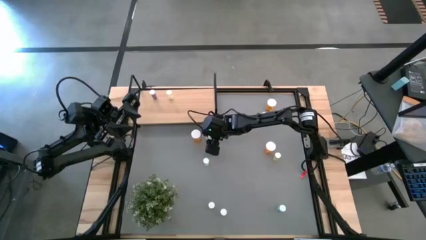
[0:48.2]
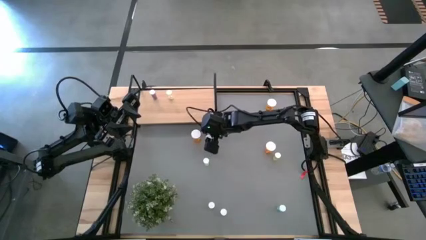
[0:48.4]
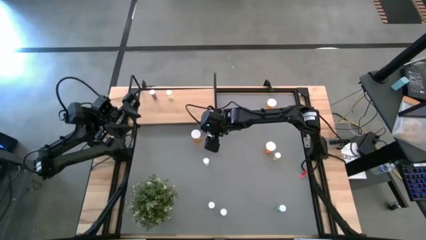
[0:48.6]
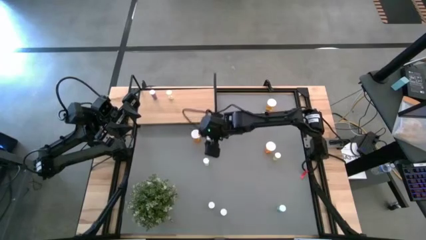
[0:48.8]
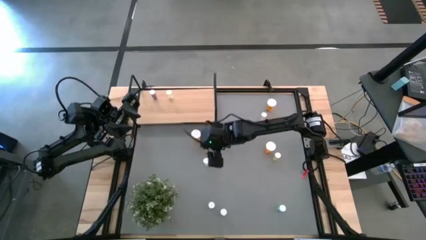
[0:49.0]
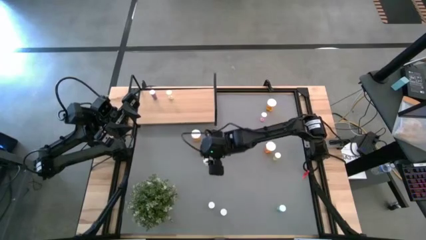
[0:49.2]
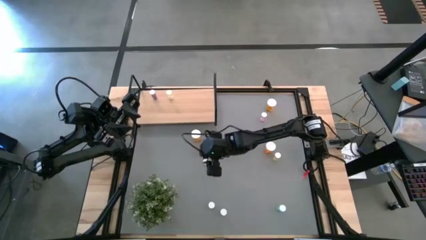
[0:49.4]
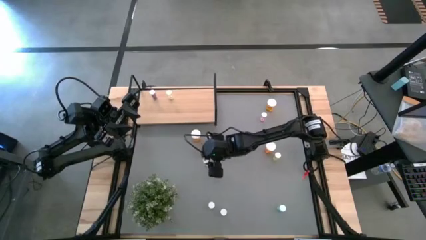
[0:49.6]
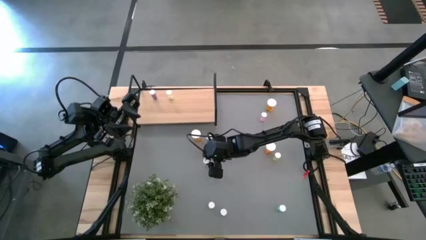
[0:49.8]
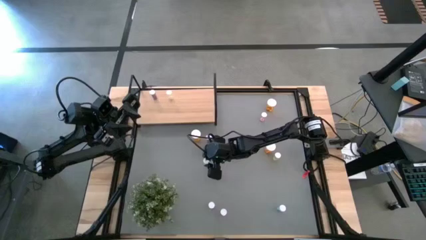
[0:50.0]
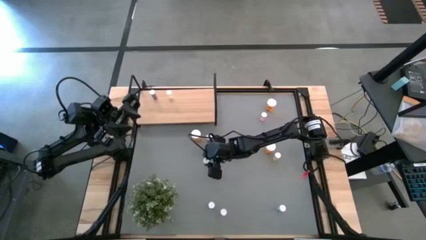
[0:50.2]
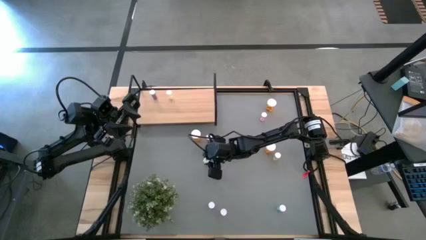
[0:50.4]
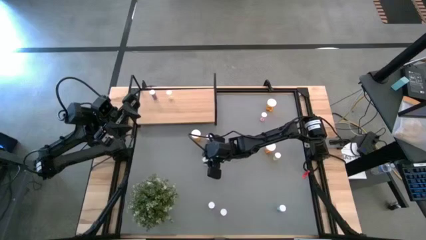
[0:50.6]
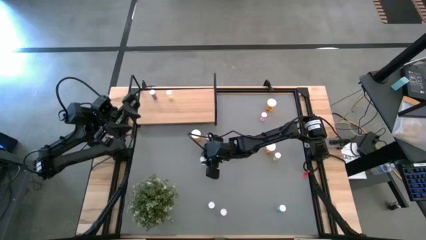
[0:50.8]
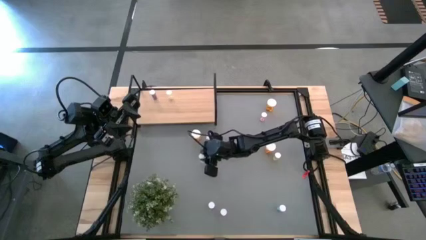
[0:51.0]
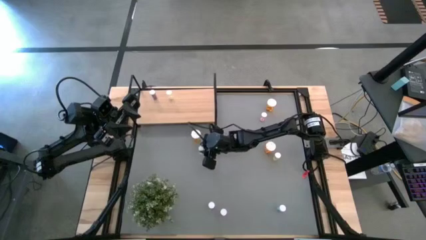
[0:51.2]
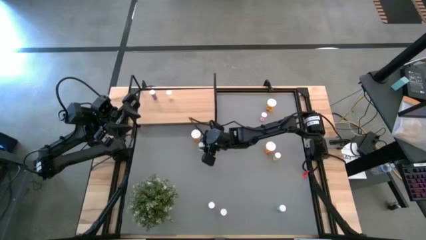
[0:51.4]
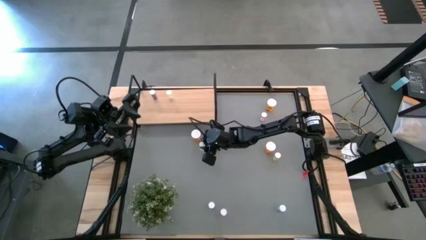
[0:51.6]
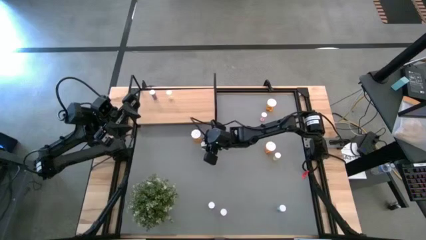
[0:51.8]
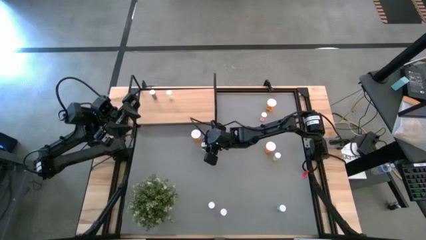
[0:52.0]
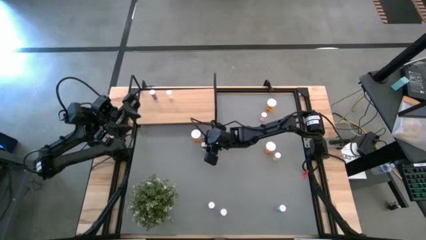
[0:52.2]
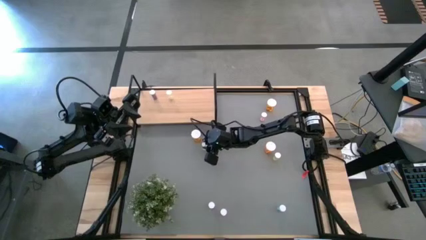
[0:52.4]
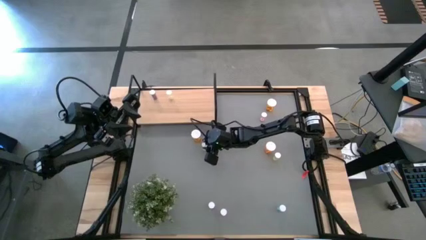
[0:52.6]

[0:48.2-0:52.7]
Task: Pick and place medicine bottles onto shelf by color
Move the middle yellow pill bottle to the middle of the table

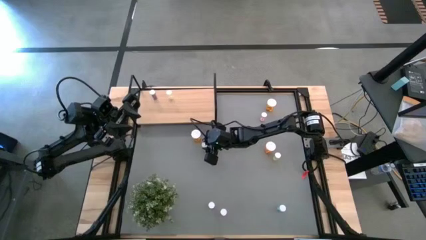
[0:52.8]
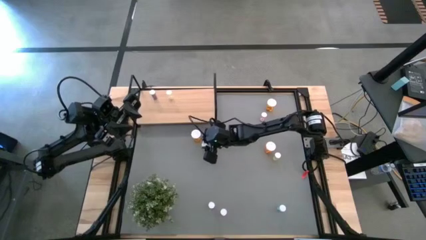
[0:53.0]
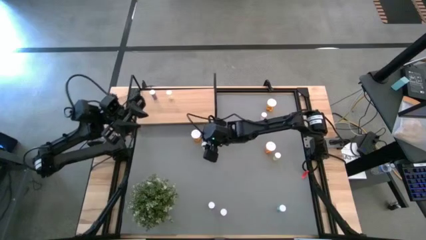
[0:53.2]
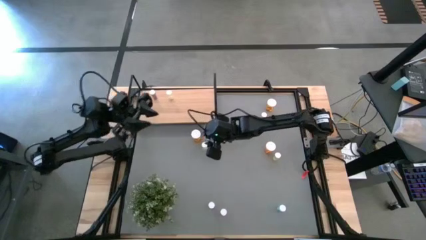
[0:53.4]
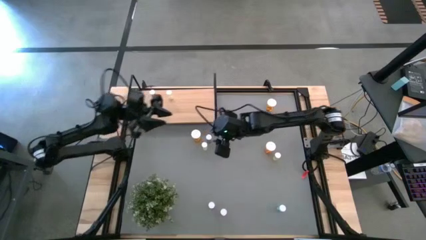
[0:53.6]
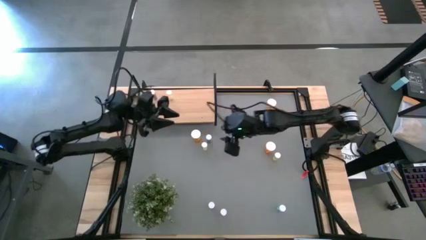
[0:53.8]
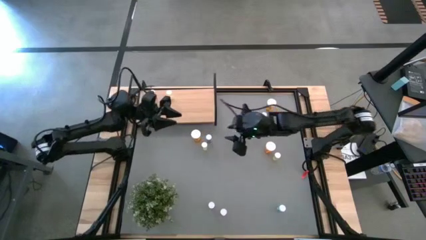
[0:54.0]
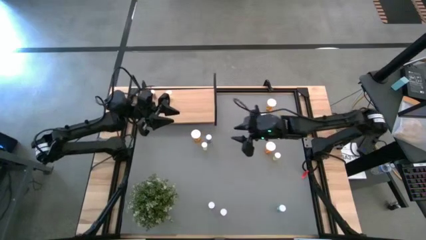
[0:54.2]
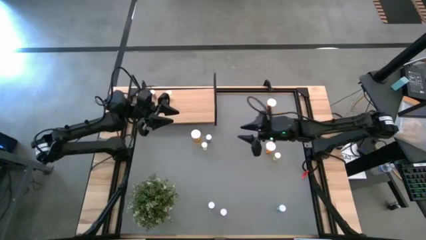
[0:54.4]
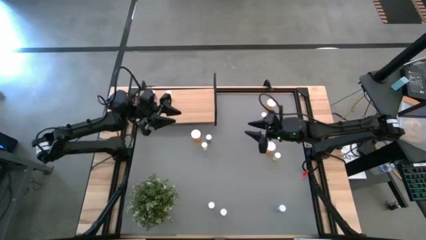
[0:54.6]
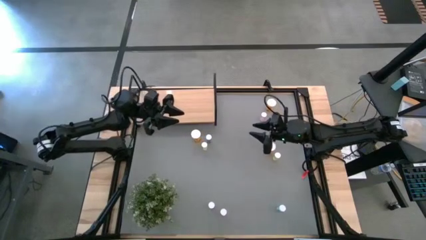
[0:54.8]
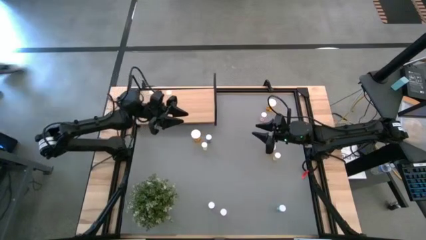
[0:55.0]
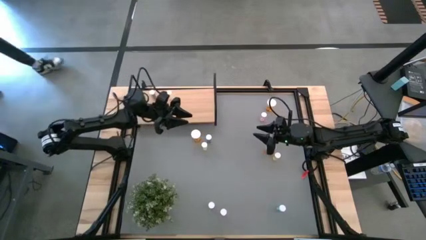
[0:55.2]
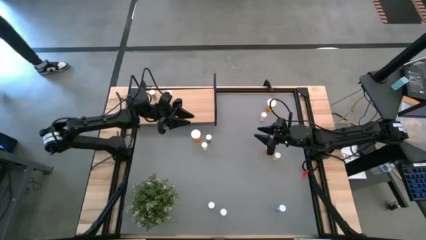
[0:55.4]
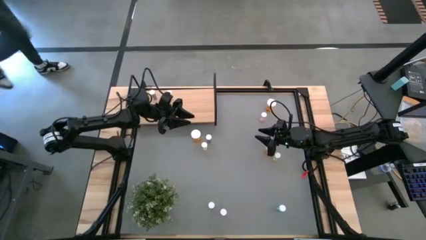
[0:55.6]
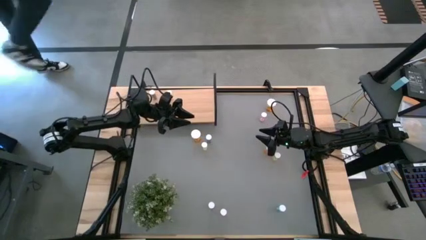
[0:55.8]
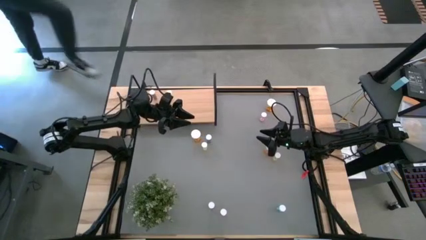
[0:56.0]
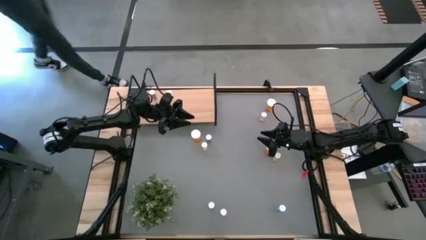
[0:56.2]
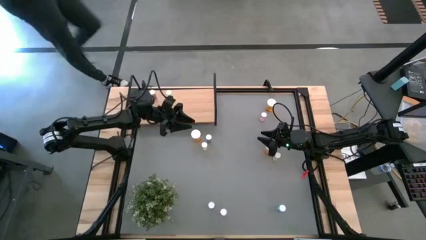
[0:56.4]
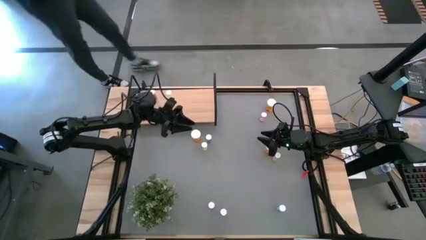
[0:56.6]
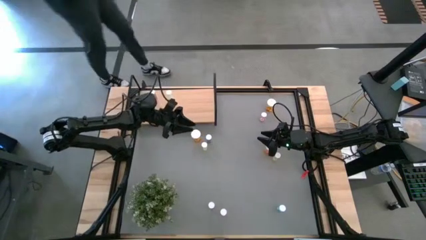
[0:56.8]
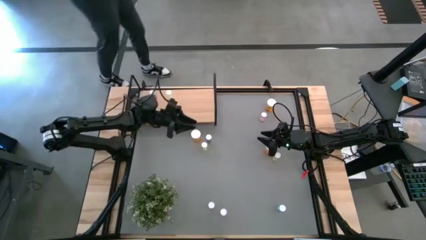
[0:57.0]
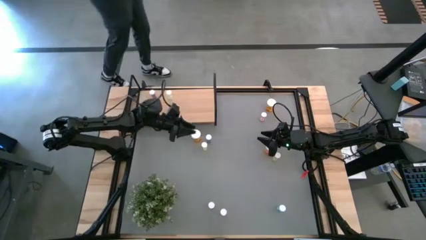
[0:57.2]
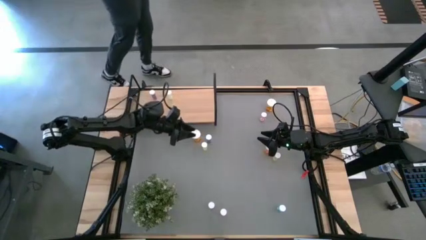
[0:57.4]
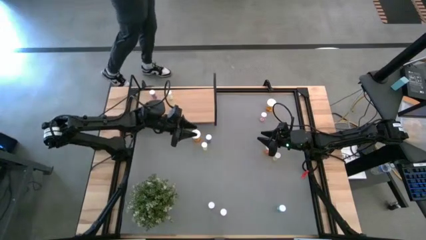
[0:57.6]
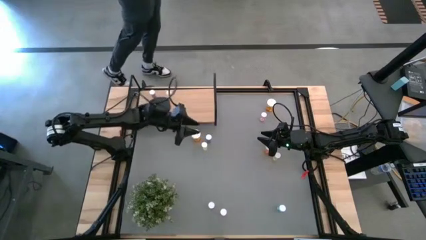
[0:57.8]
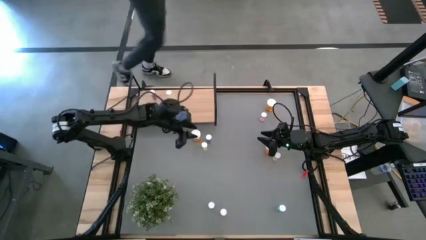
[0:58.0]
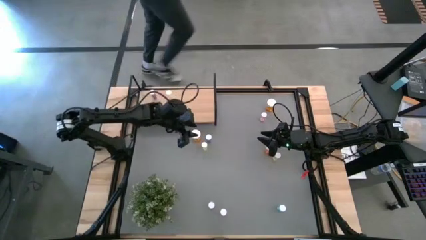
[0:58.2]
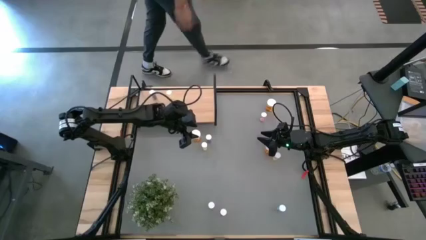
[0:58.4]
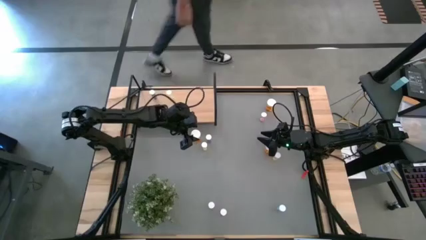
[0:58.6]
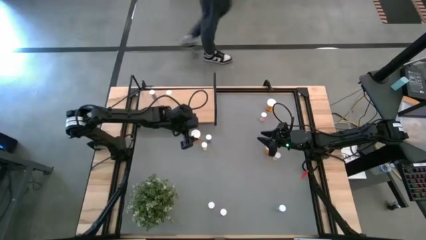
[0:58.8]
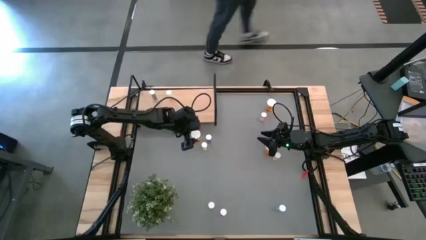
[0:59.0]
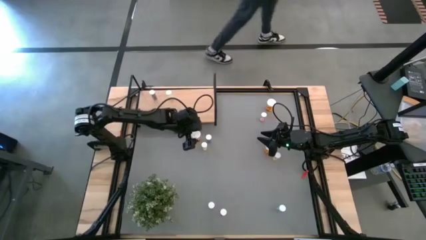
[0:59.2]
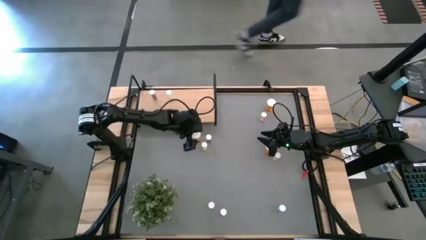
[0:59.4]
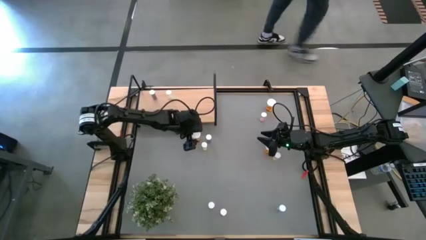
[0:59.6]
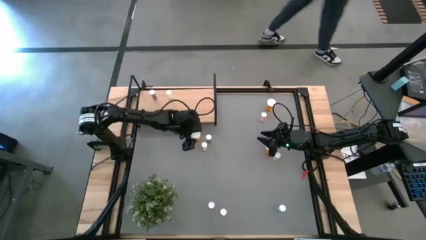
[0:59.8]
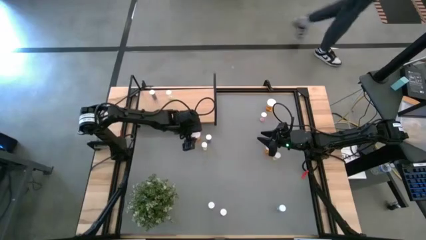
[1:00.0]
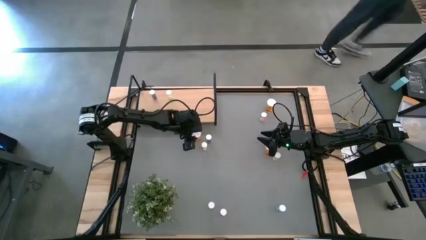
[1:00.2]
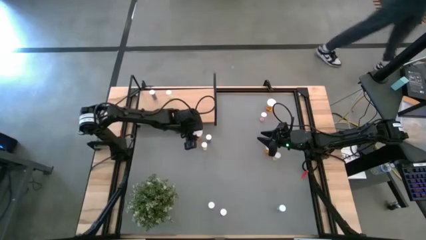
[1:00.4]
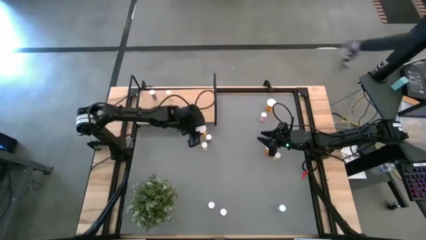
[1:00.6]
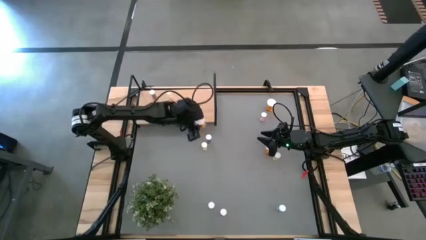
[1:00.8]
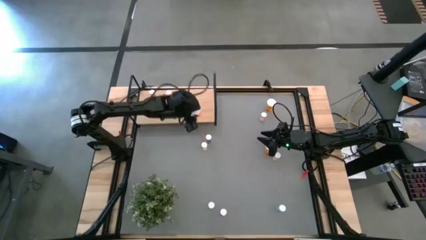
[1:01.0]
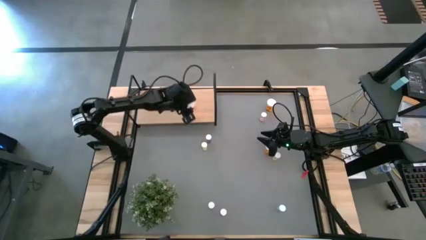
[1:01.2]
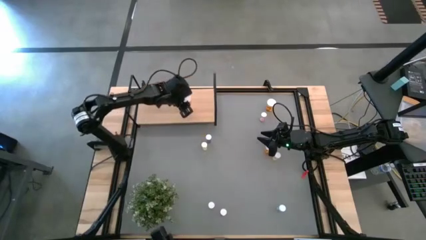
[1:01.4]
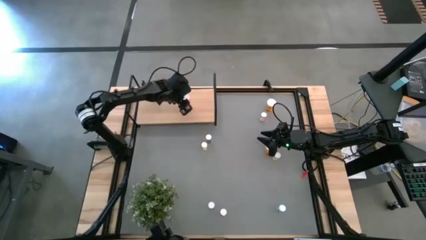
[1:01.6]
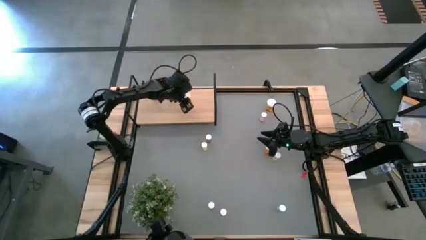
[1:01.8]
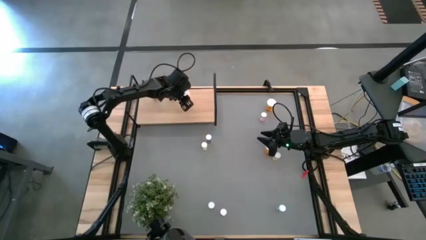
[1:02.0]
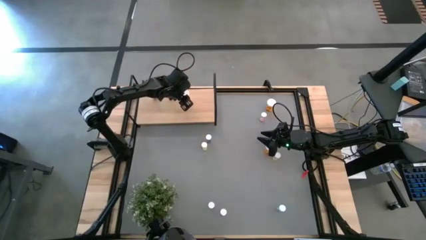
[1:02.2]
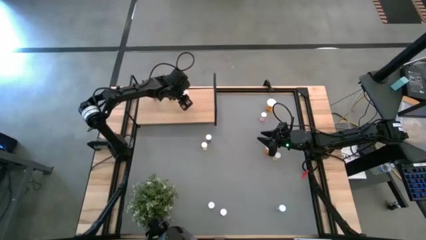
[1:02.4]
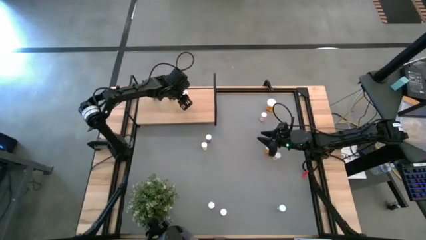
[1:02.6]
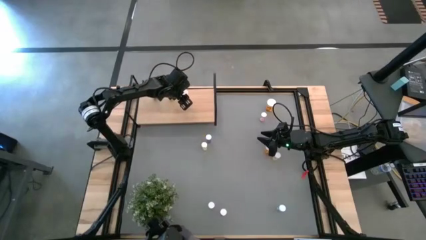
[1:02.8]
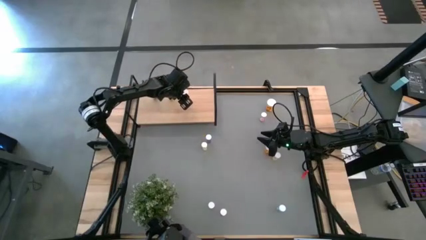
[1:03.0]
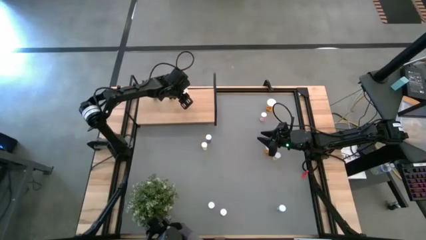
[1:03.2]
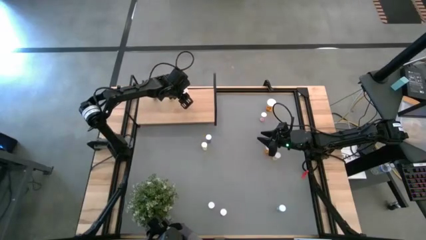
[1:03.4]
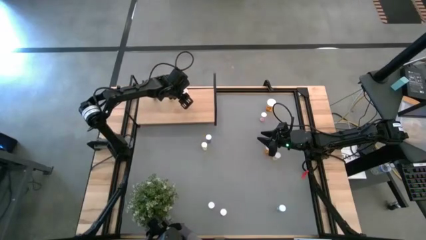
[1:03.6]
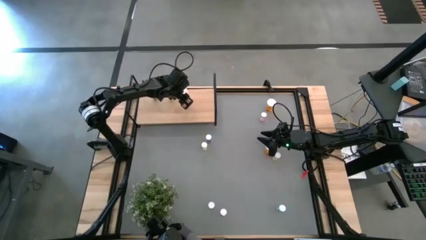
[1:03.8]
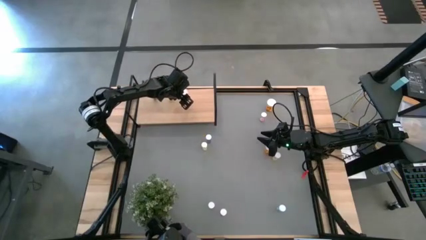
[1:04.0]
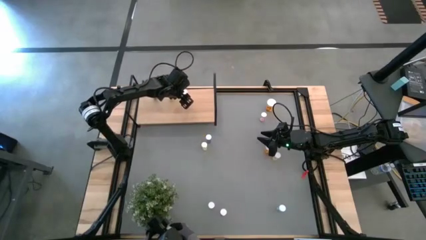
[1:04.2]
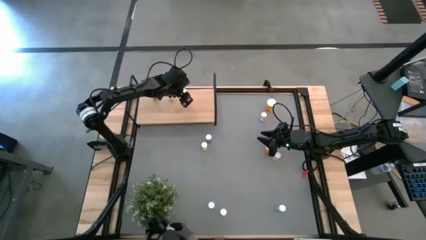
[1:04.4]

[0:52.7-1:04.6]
Put the bottom left orange pill bottle on the shelf
